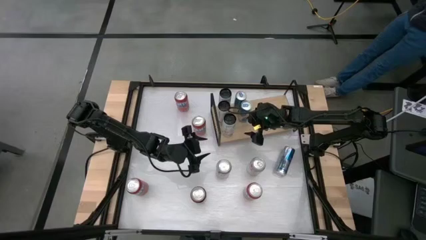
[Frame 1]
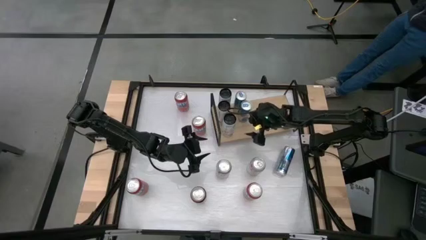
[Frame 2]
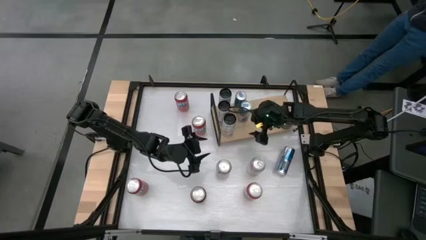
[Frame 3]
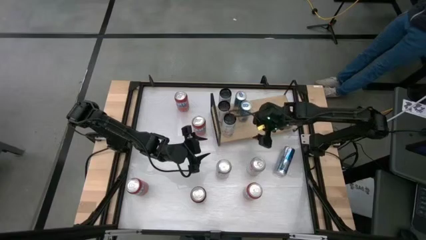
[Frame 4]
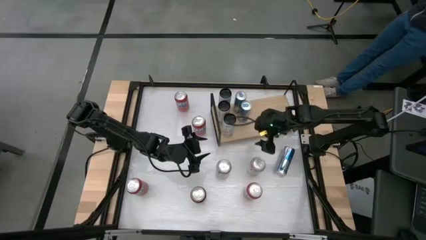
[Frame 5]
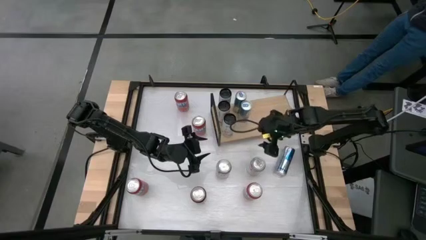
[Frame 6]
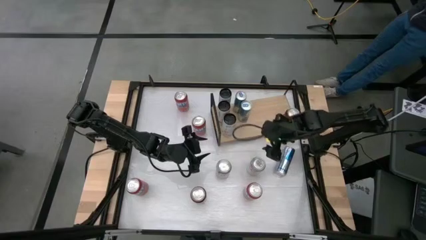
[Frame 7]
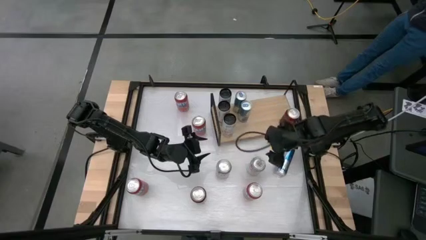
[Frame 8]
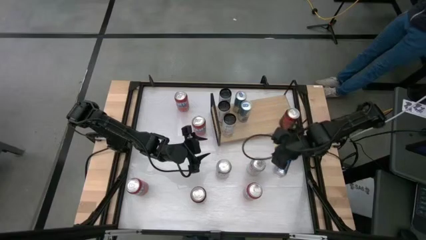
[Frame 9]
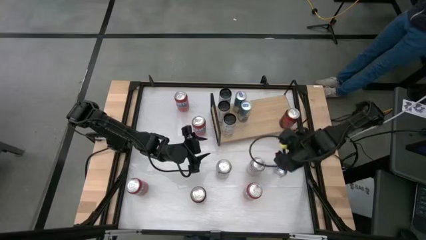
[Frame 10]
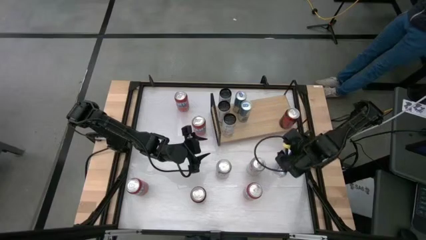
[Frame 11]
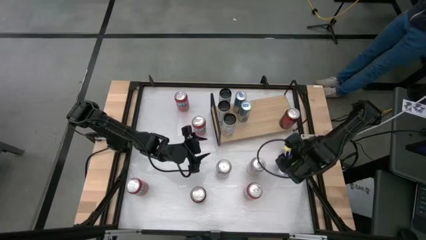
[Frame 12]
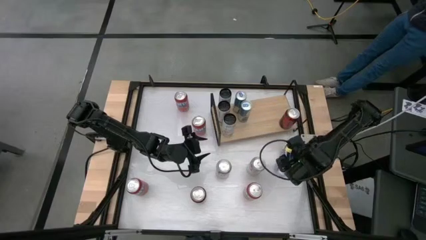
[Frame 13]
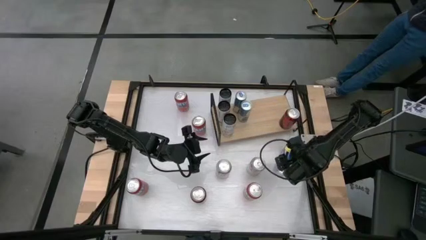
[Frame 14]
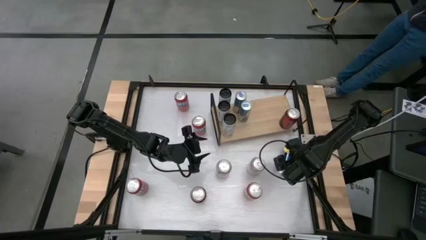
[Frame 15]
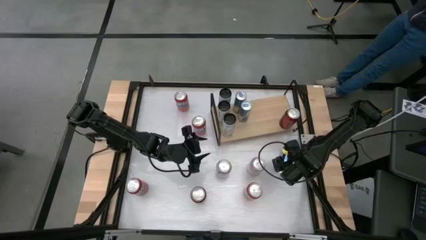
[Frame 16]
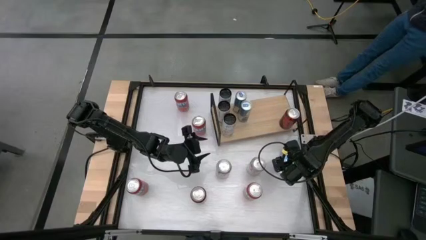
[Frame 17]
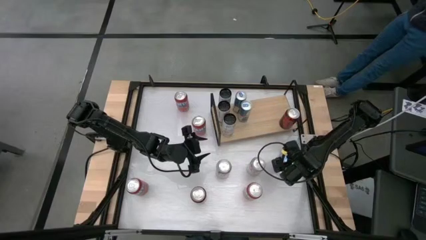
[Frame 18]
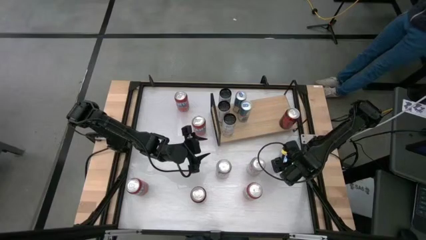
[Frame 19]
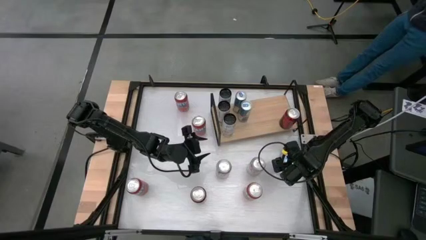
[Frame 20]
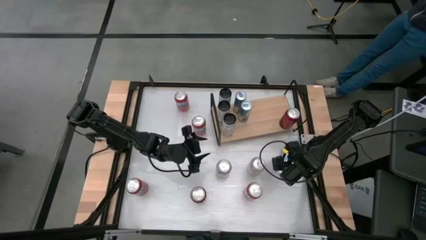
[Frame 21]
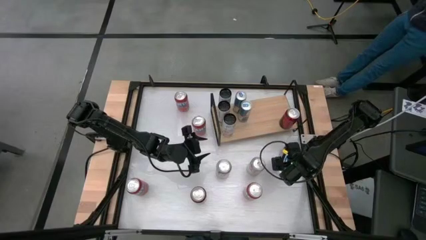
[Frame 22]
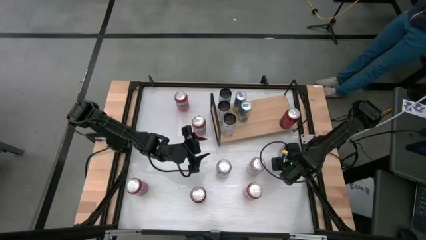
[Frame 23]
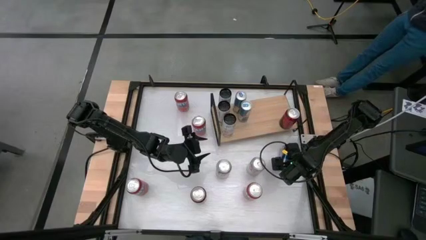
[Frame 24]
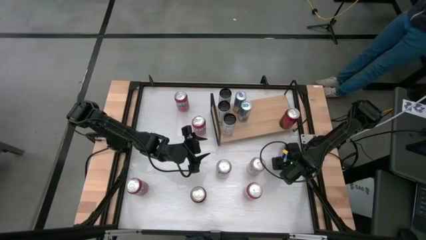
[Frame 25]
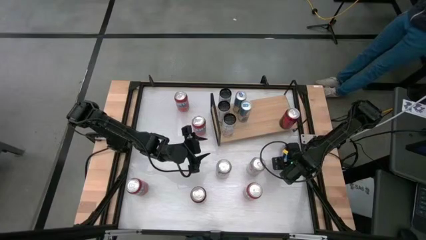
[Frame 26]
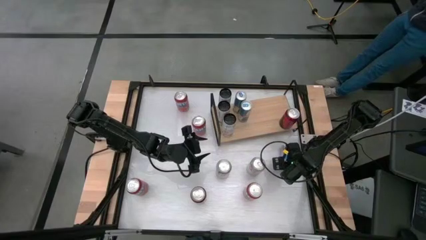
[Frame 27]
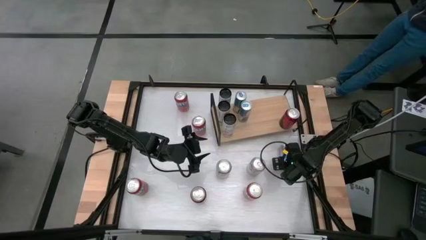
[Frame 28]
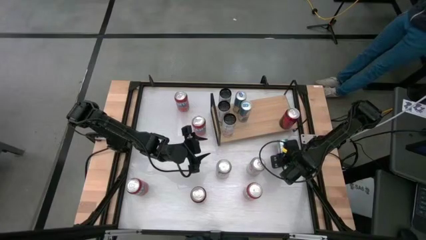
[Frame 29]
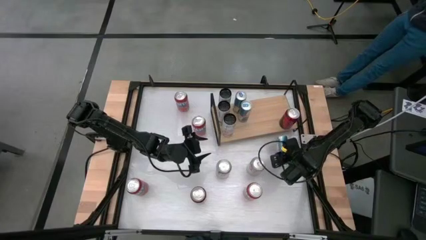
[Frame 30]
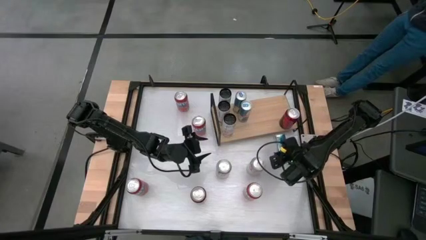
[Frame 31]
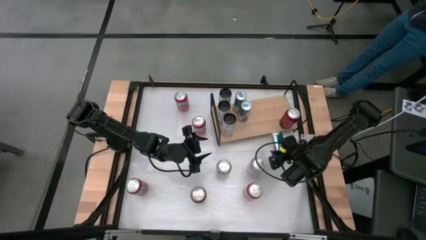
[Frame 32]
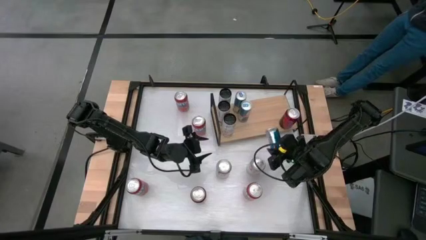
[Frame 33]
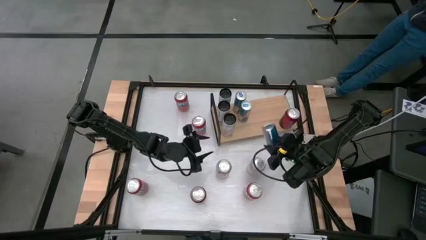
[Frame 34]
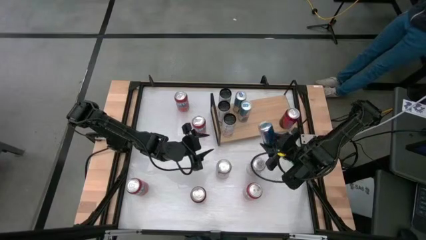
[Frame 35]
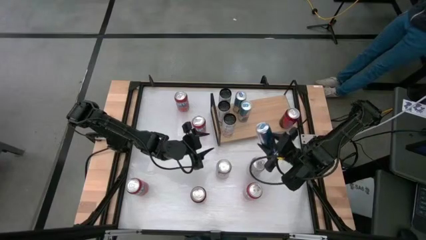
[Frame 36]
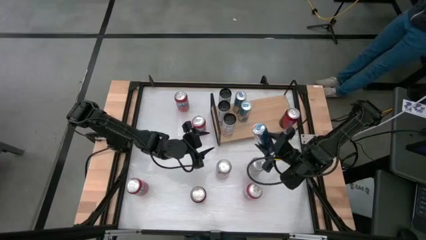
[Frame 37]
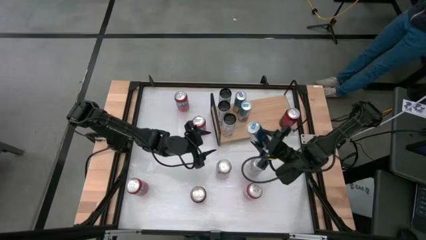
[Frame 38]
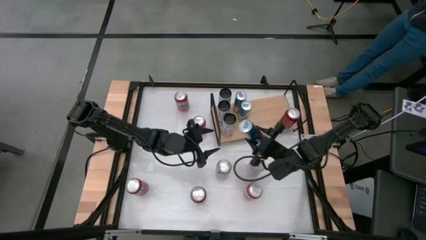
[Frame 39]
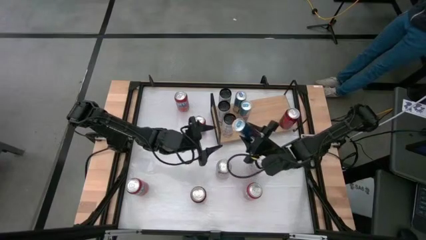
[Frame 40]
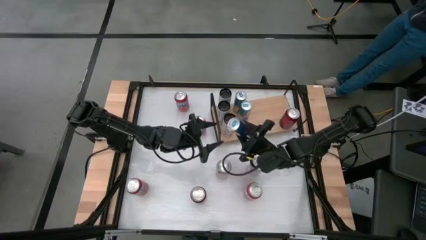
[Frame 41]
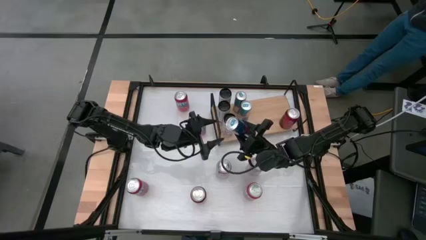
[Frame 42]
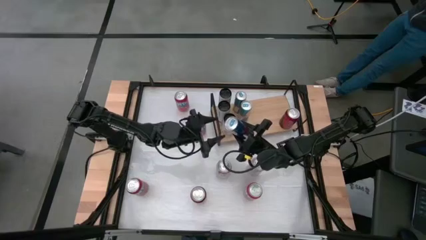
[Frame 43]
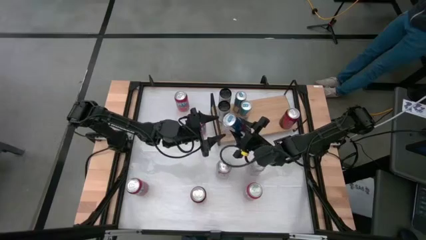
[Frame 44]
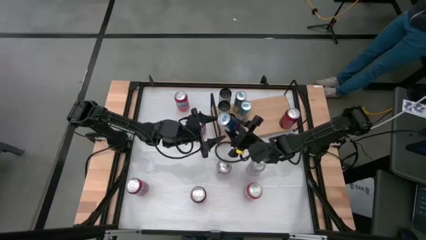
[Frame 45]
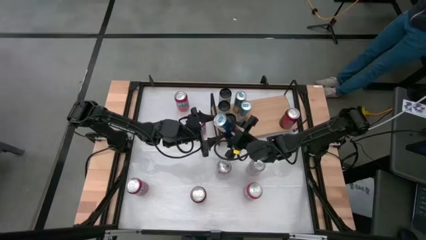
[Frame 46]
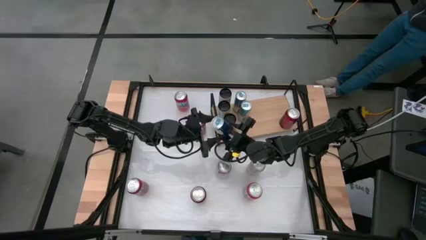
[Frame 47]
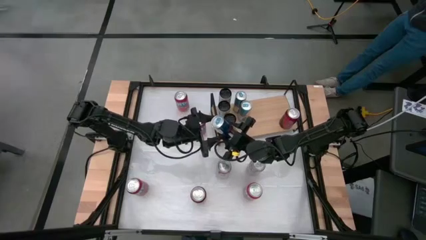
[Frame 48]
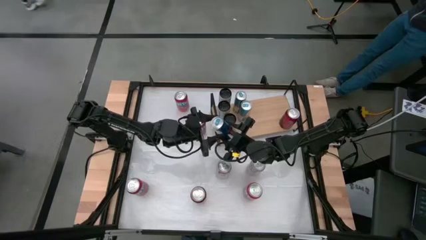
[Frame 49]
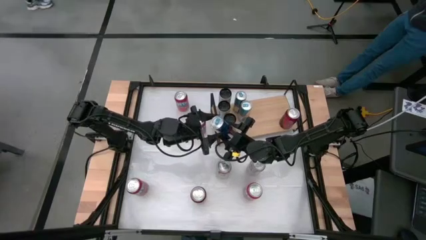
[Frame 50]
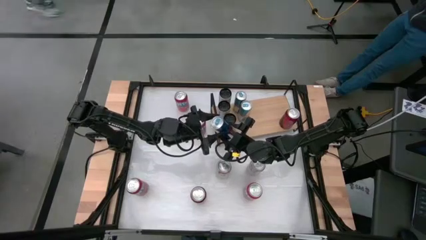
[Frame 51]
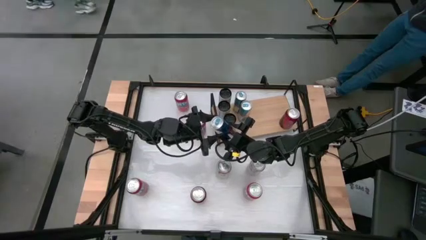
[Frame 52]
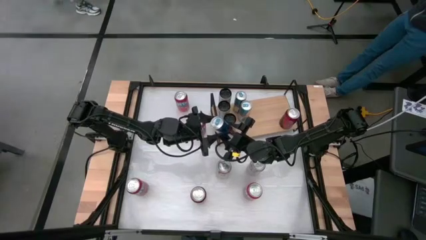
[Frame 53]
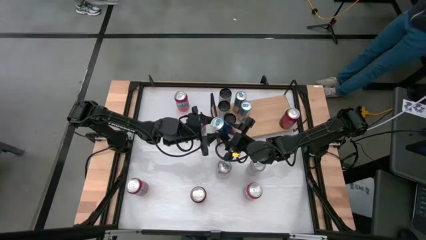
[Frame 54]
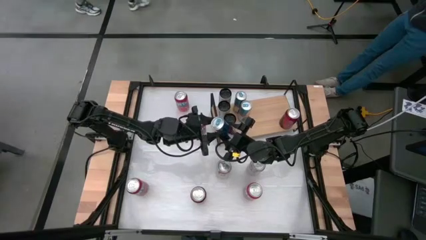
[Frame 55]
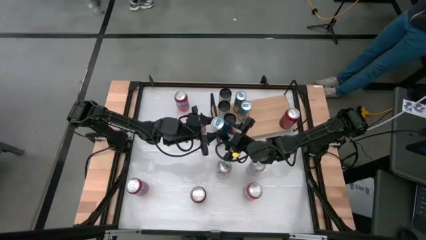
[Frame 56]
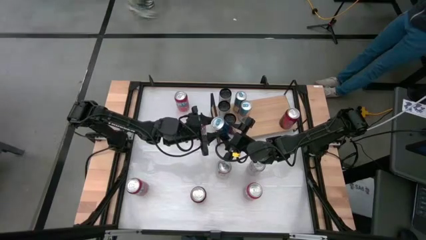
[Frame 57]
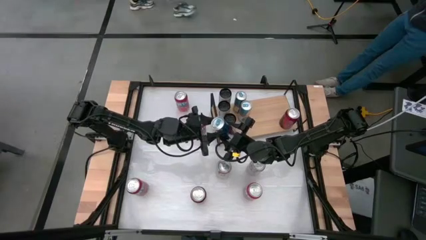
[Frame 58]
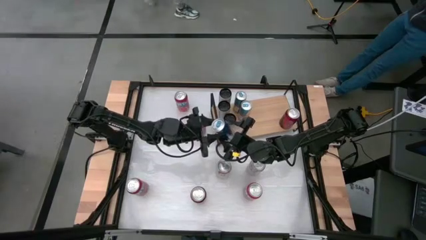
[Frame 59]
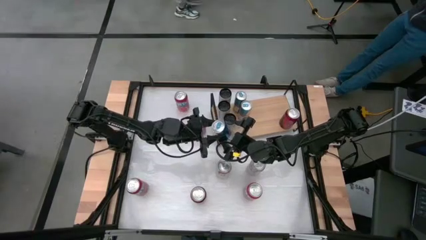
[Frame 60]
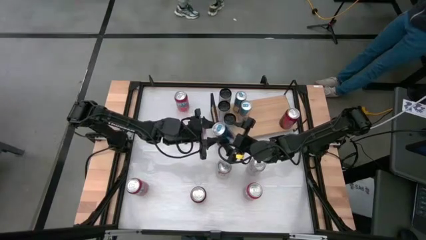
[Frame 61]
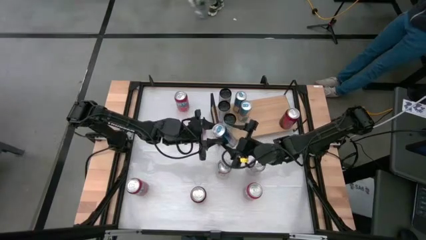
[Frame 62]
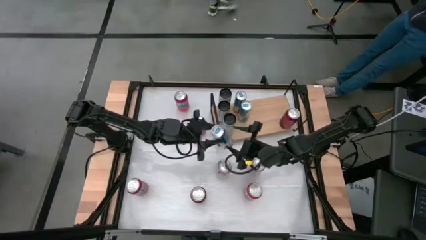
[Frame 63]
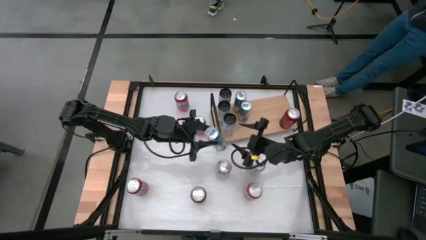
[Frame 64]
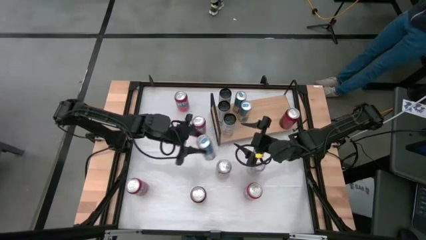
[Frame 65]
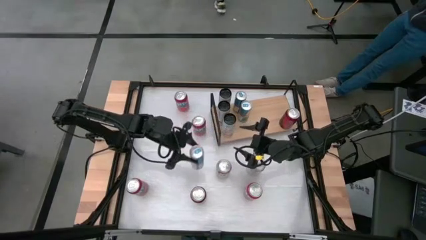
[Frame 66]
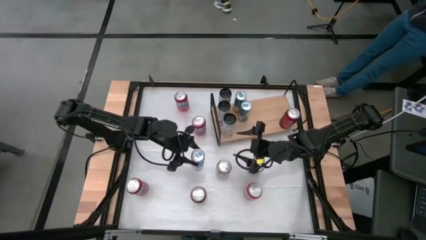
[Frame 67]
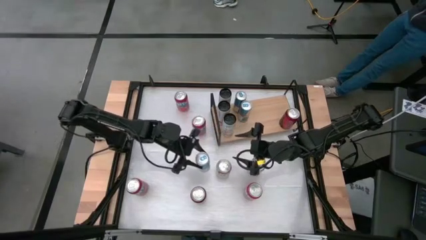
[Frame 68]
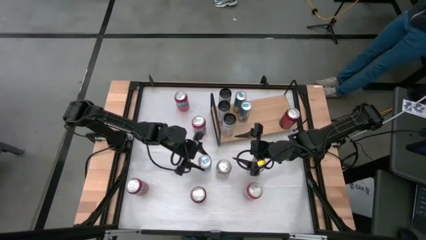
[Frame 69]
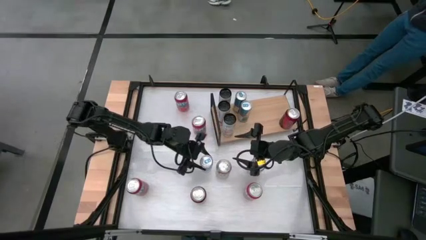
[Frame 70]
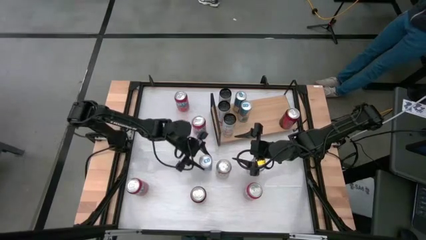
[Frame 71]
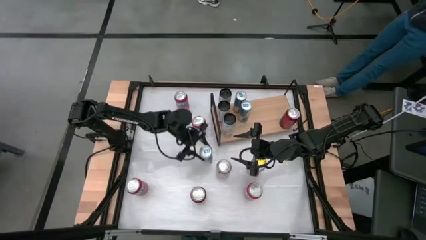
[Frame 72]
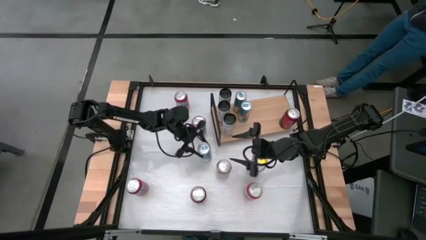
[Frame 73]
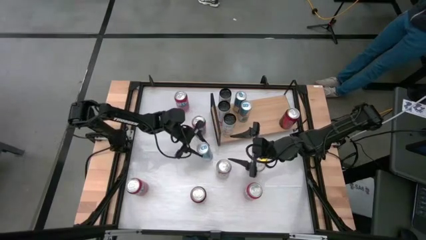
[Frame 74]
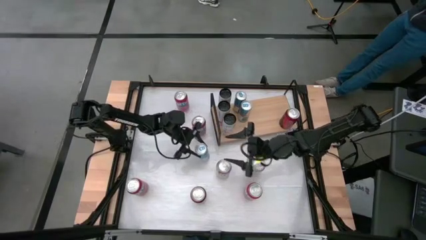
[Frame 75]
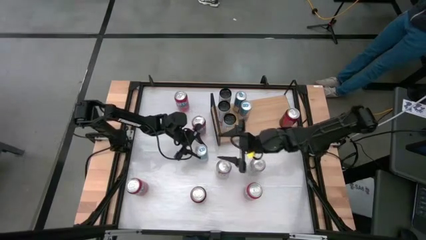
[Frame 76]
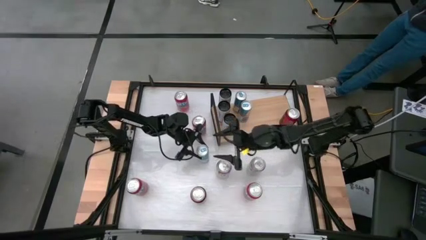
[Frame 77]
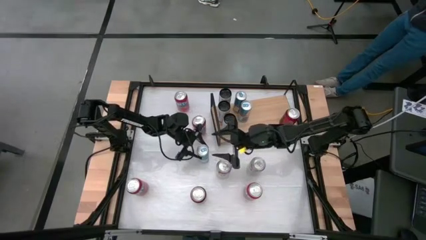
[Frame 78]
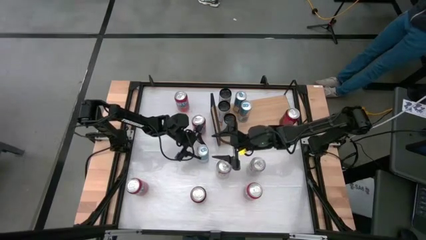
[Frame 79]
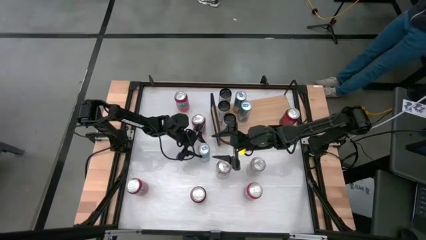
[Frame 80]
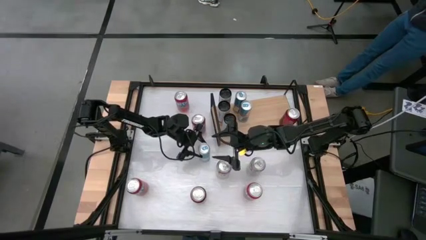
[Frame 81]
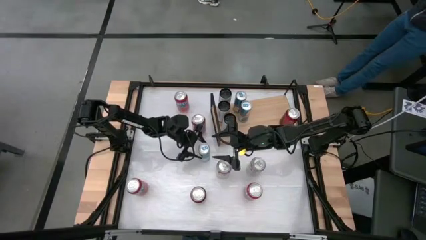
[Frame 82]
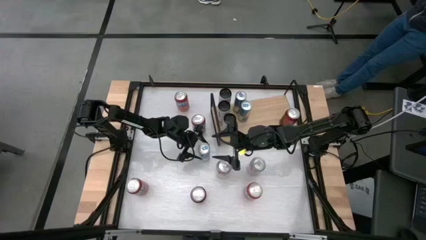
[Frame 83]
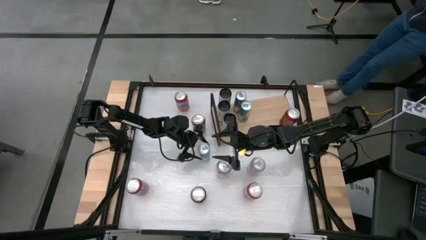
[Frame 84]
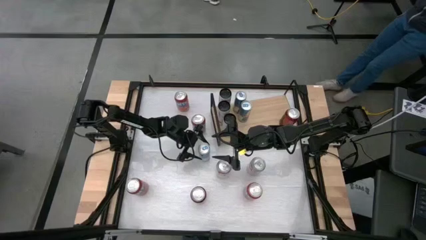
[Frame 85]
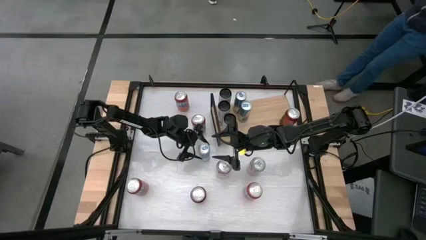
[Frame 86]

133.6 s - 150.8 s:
Task: Place canned beverage on shelf
Put the blue white soda can on the shelf aligned with the other blue white soda cans
